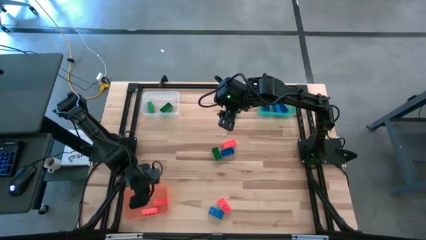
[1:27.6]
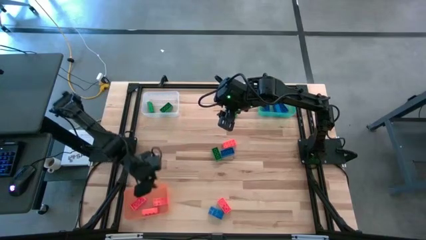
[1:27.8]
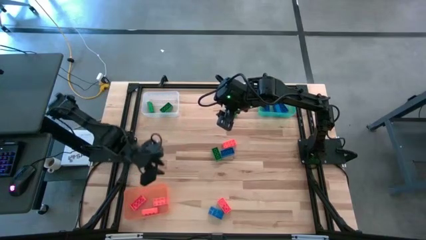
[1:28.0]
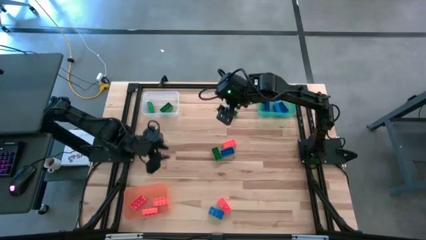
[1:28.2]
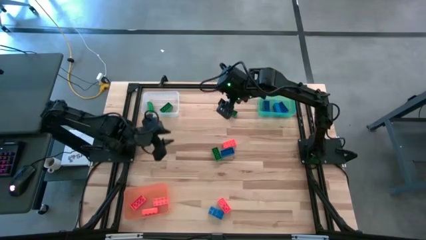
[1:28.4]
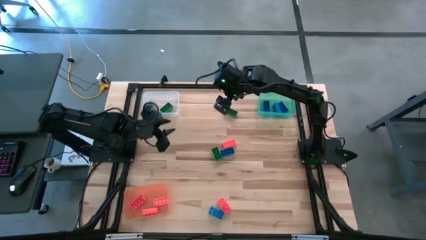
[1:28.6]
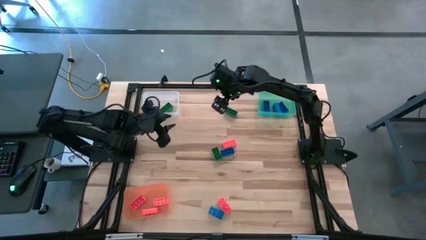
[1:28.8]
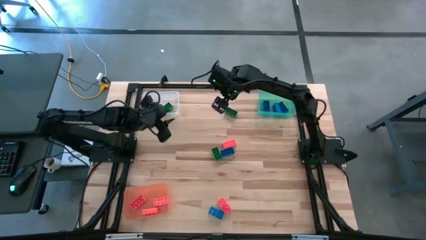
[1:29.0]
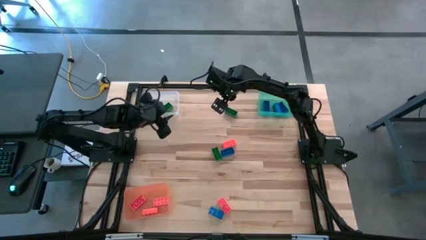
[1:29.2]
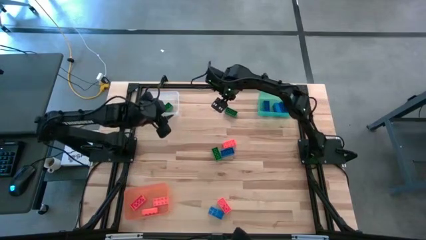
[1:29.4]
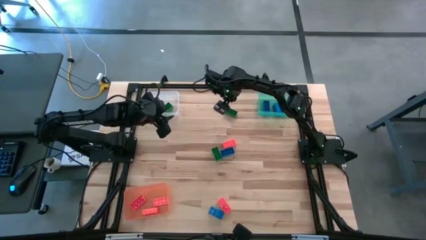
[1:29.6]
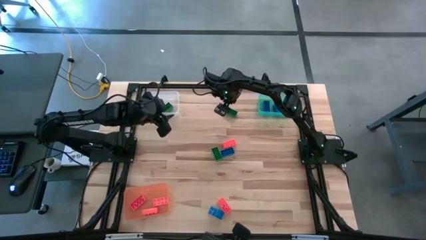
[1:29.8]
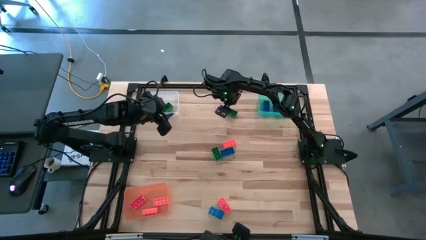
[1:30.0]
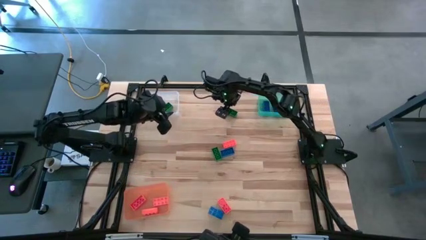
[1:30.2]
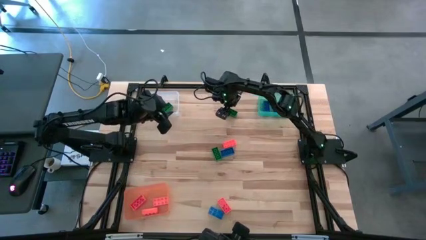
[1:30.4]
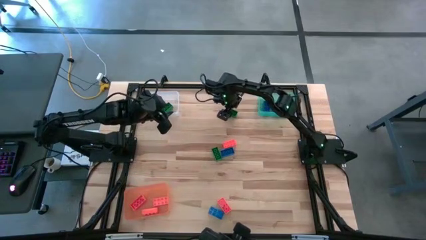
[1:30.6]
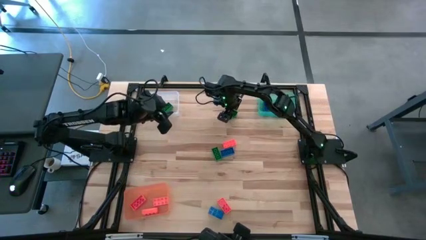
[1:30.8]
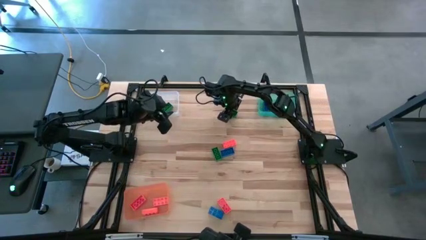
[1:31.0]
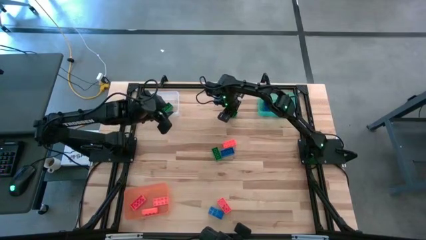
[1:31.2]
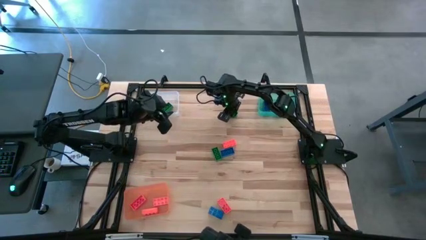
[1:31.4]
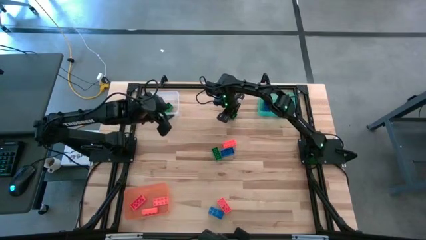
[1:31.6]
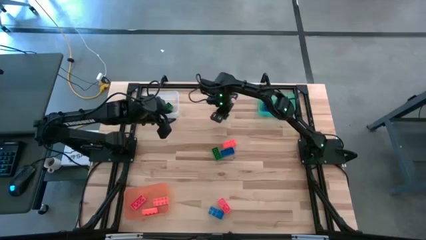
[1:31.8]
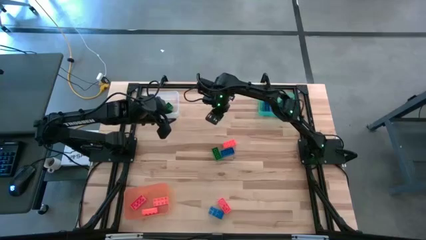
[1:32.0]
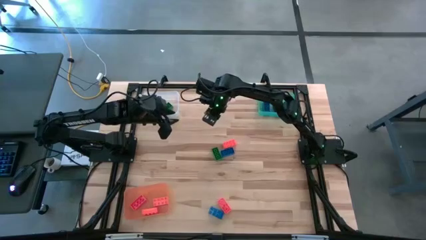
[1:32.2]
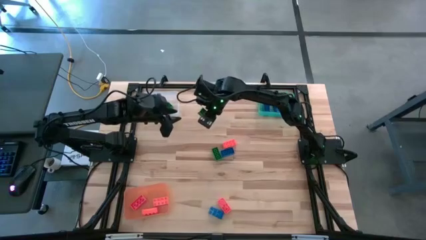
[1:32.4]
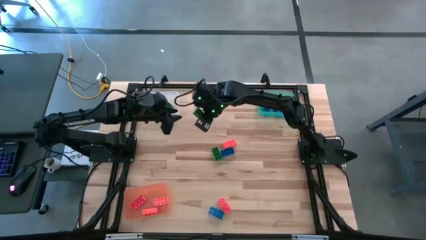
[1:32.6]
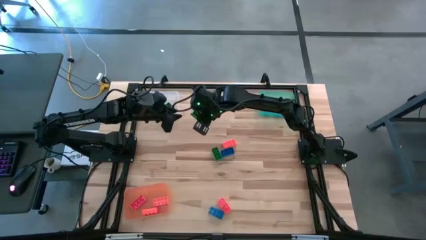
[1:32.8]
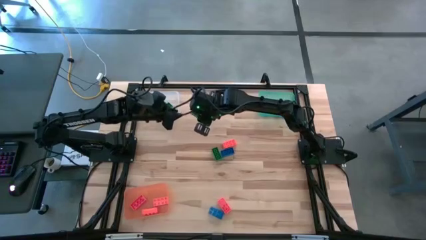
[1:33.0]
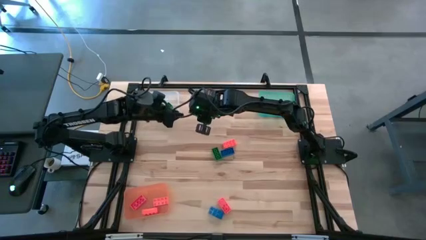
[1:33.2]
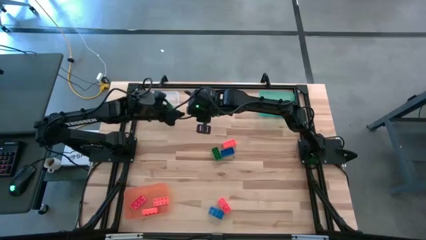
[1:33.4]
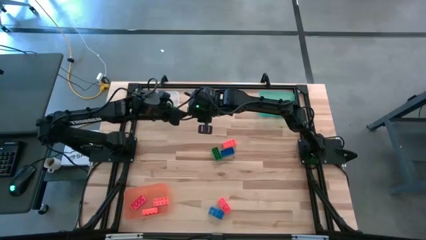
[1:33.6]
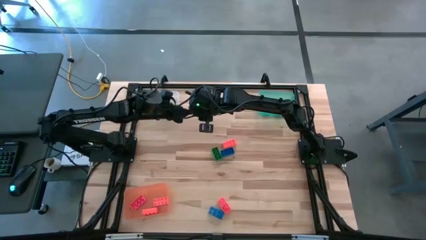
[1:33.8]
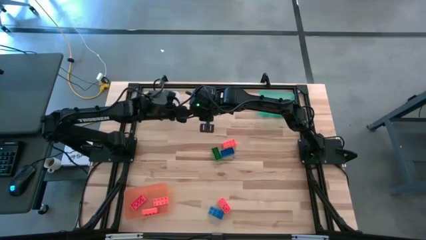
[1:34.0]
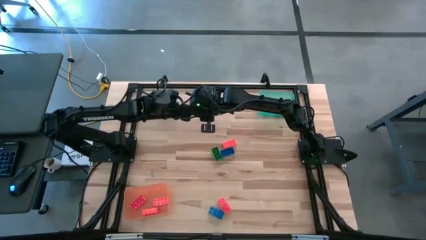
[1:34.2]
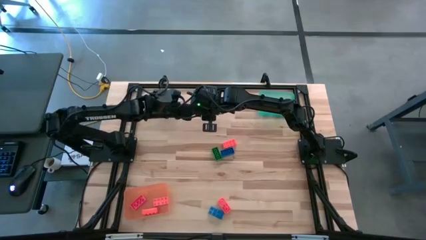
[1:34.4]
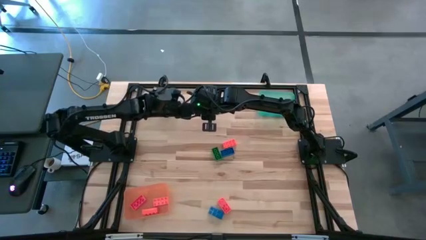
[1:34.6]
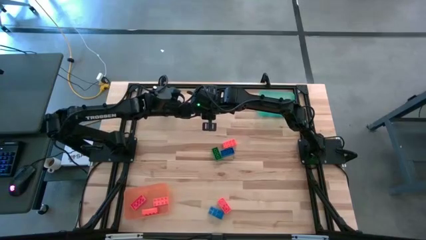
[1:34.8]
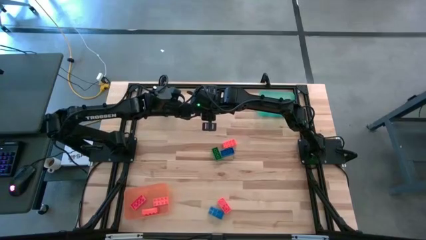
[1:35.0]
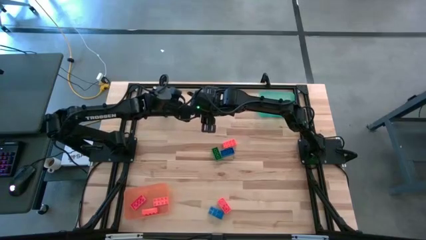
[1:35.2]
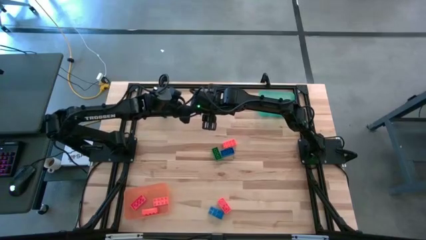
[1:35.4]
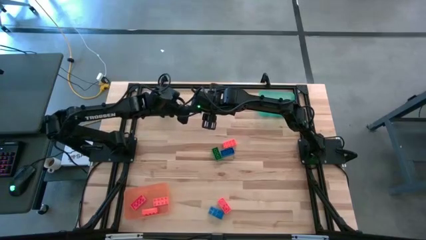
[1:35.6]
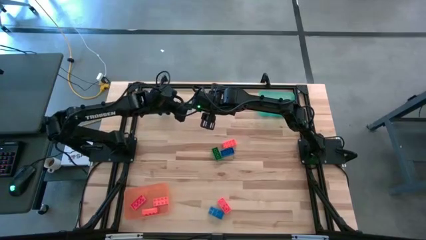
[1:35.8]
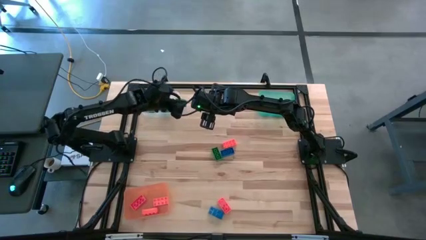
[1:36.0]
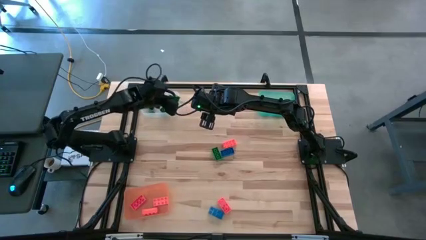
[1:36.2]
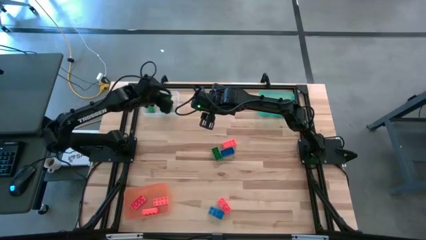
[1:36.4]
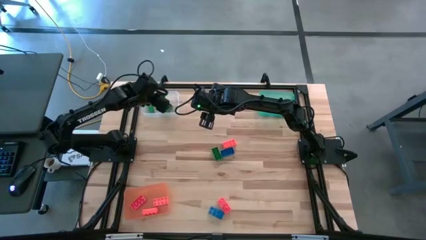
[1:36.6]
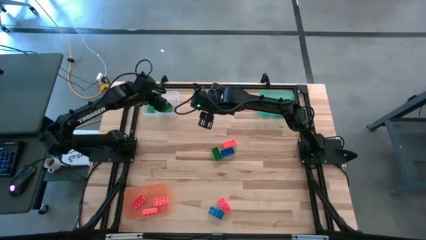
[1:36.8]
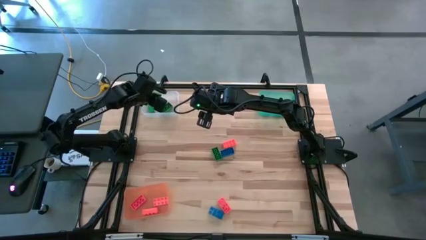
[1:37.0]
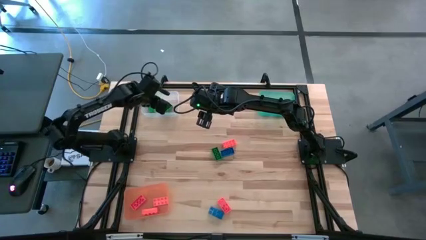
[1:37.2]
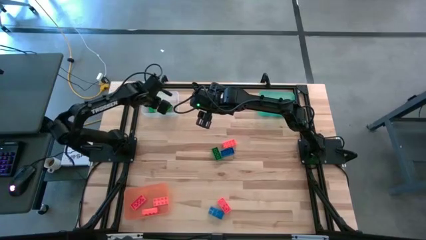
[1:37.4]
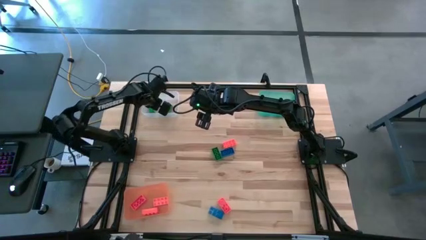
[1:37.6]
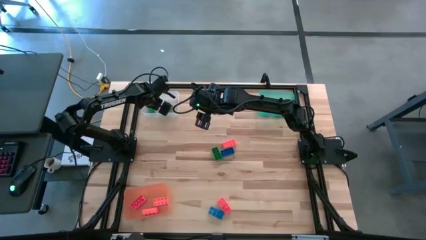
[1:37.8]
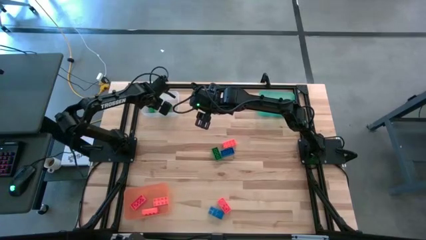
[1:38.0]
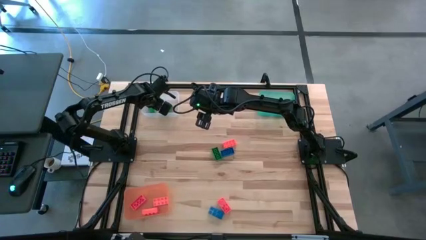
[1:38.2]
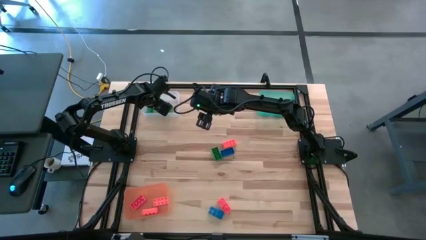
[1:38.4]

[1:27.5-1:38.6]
Task: Sort & place blocks by color
Put the green game piece into the transparent bin

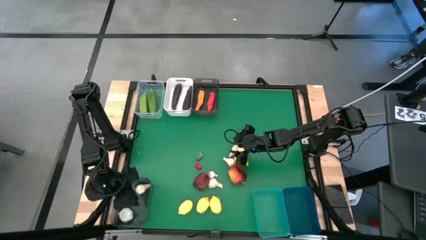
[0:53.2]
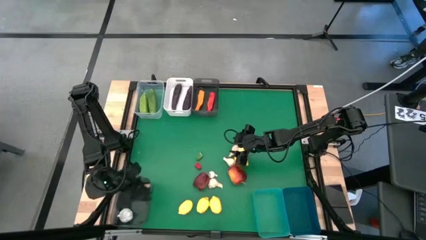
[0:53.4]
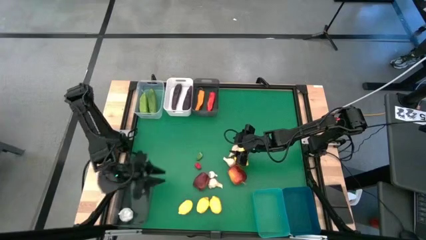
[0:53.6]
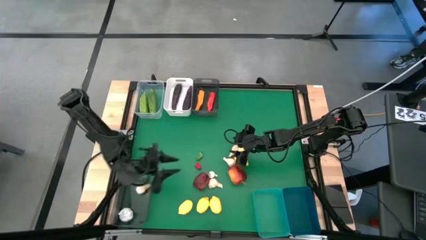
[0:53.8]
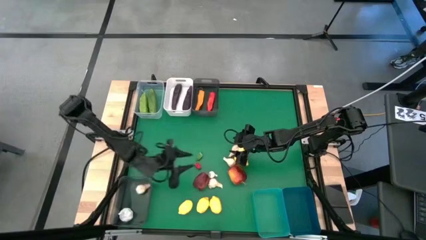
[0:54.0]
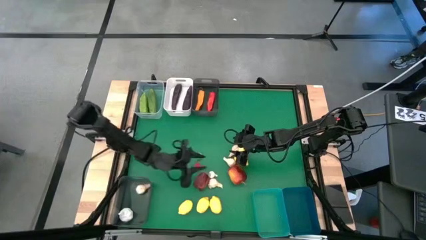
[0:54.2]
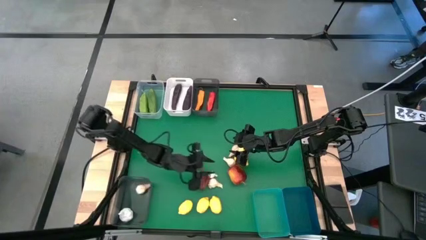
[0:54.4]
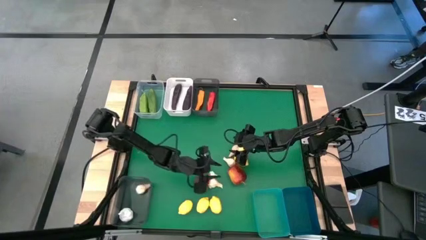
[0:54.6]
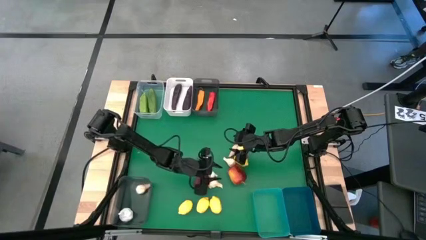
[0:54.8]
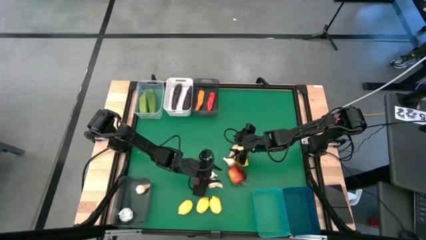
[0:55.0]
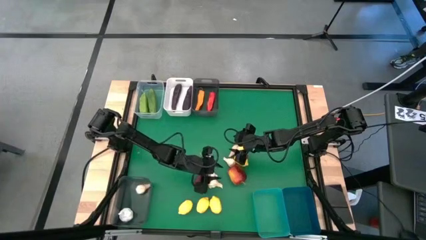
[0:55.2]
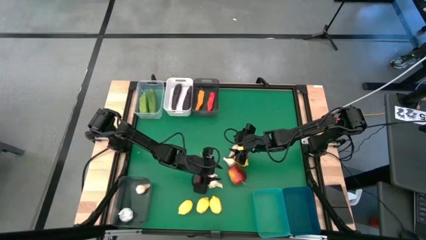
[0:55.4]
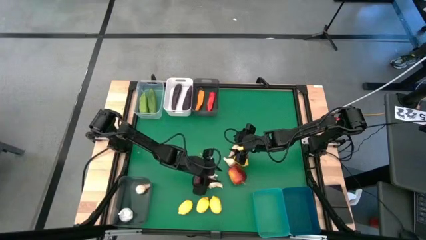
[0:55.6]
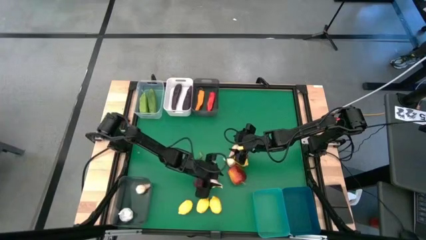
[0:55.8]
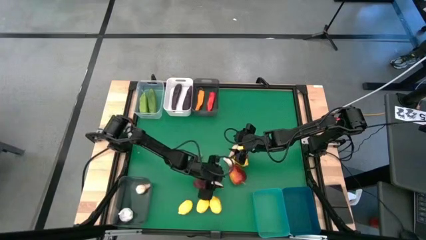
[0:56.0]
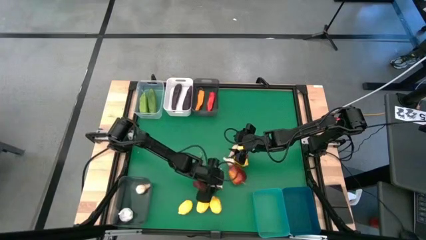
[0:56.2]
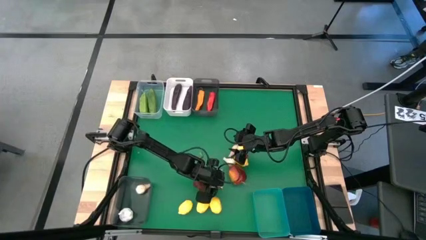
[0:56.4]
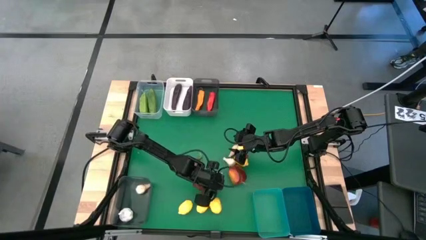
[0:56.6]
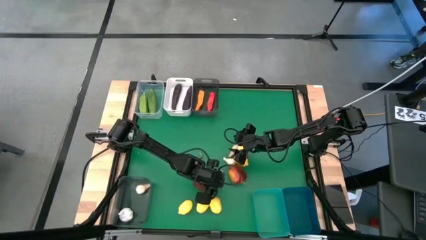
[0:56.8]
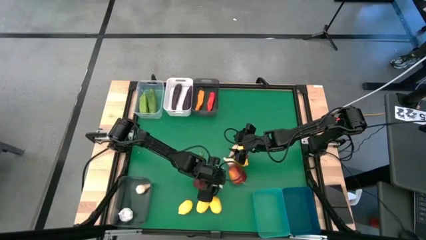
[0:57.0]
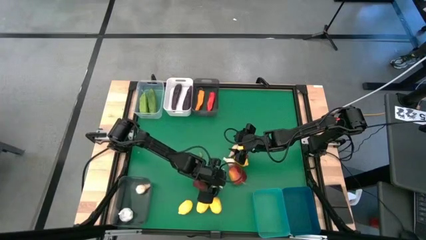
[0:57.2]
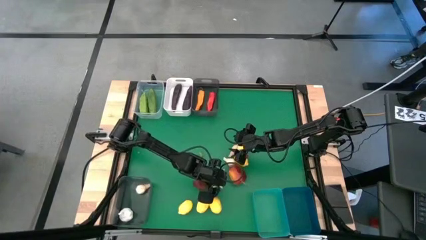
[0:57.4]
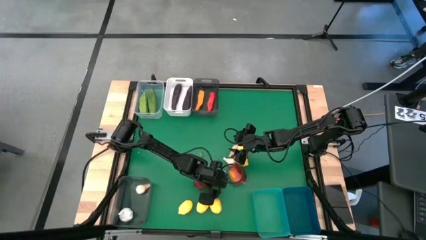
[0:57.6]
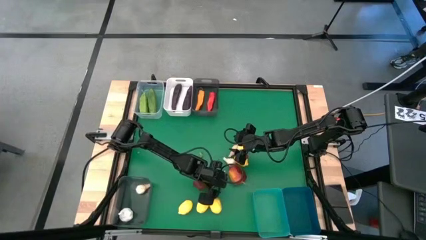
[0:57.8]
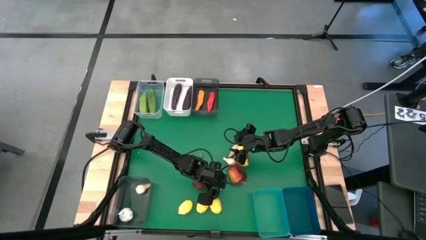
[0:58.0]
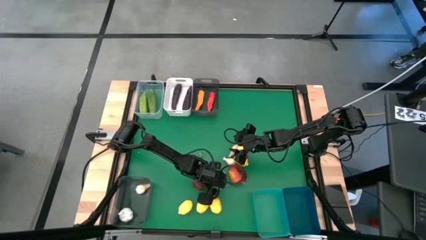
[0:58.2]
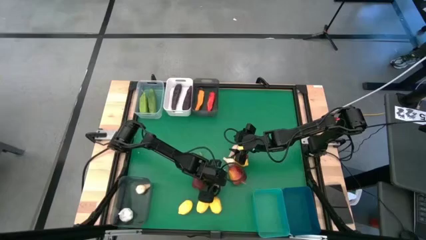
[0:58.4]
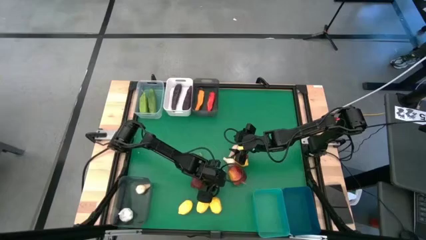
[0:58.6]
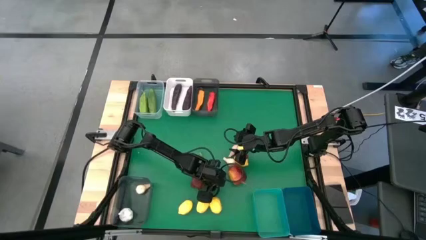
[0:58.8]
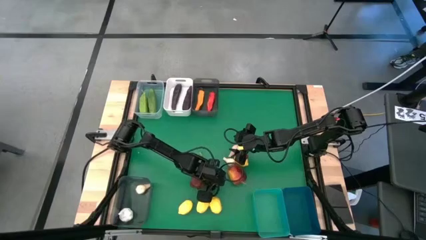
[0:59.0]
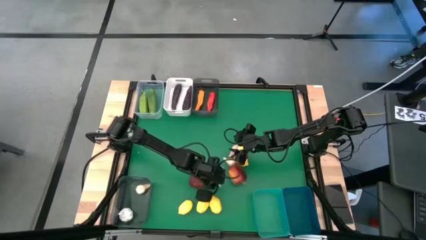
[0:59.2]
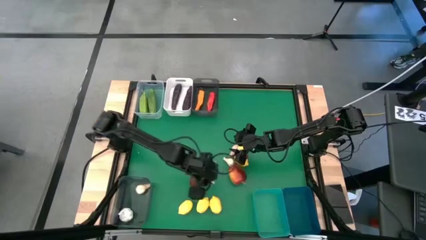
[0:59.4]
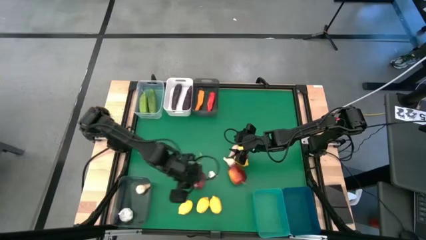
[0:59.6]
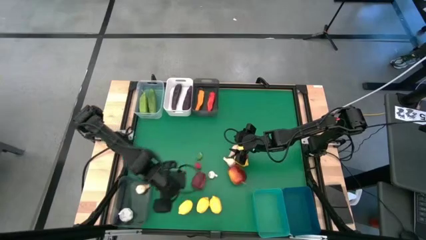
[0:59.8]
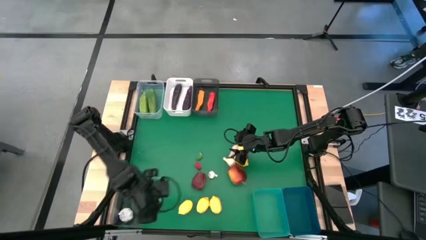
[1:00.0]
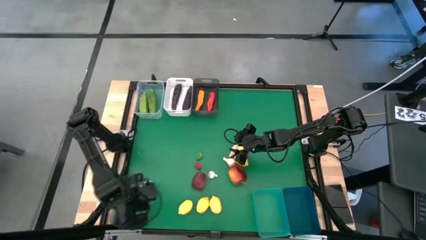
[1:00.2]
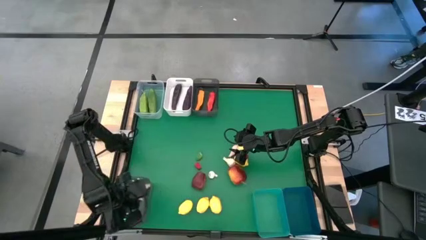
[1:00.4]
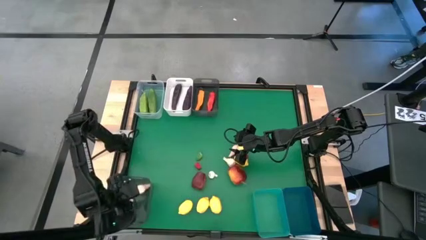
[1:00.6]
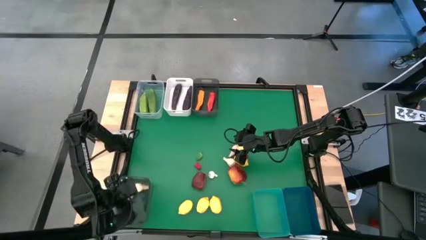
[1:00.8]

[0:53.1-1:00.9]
Task: Sort produce into baskets
Put the white garlic into the bottom black bin
